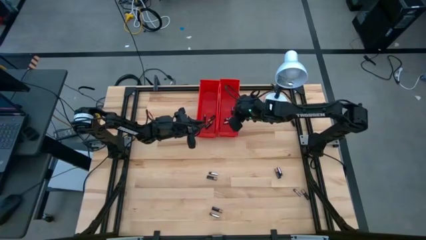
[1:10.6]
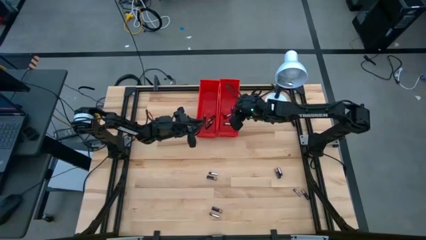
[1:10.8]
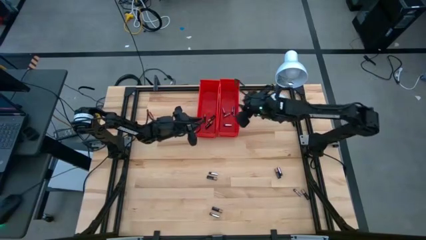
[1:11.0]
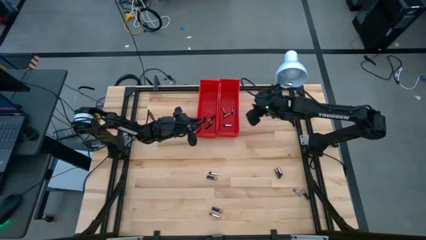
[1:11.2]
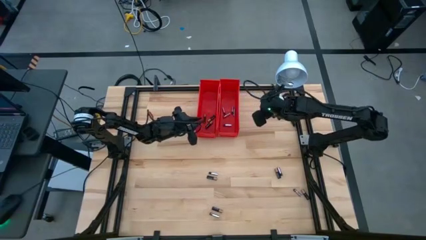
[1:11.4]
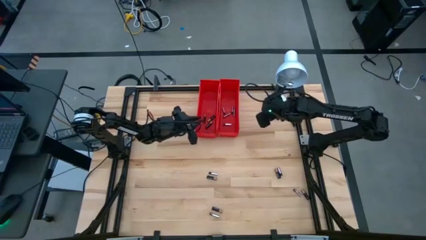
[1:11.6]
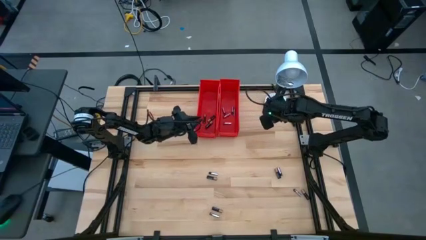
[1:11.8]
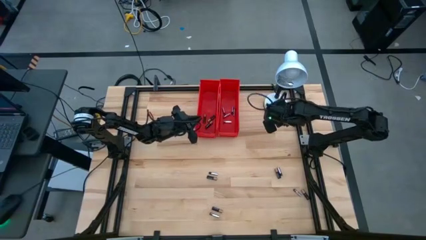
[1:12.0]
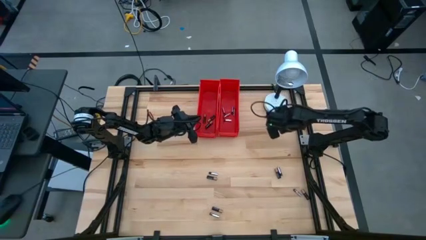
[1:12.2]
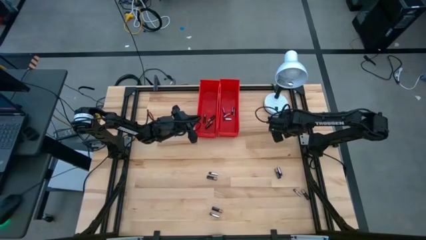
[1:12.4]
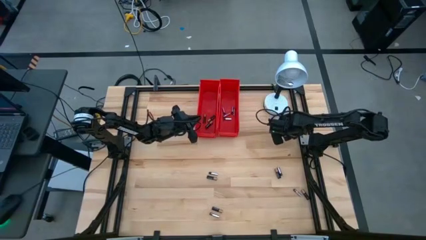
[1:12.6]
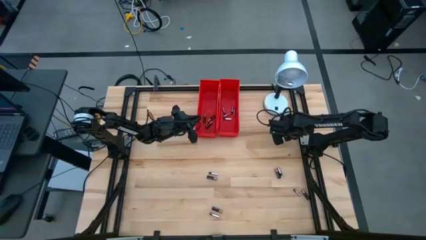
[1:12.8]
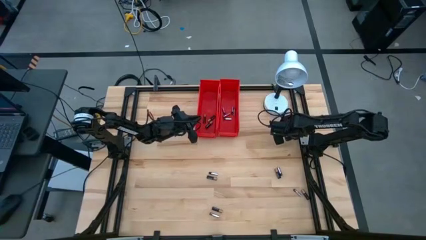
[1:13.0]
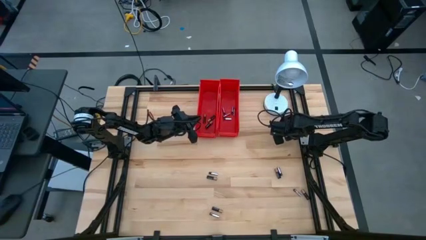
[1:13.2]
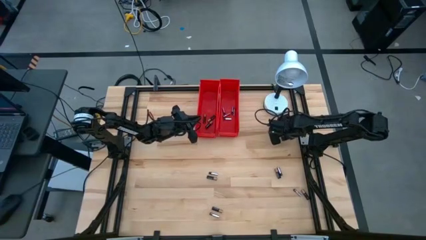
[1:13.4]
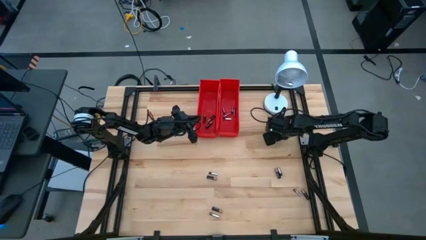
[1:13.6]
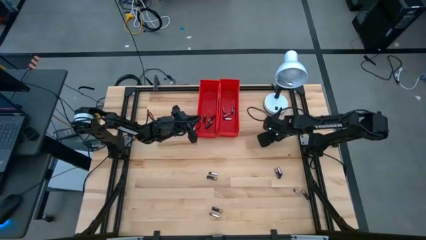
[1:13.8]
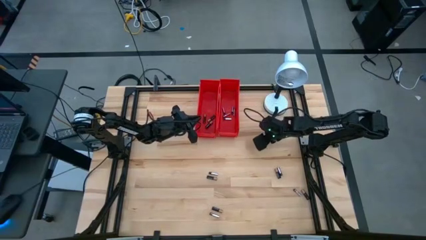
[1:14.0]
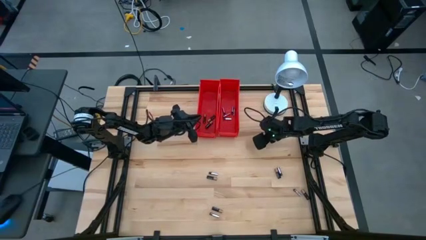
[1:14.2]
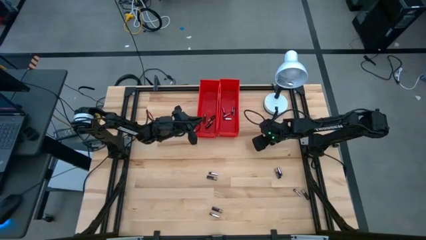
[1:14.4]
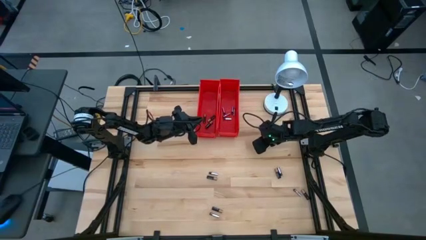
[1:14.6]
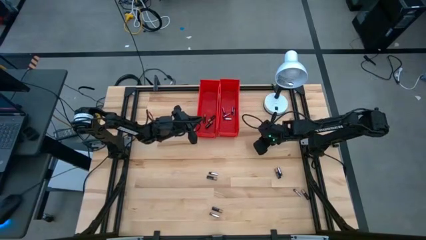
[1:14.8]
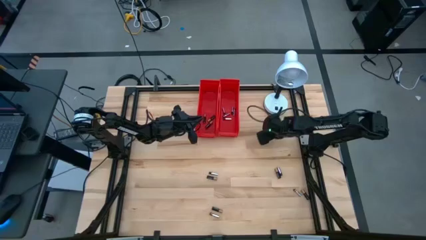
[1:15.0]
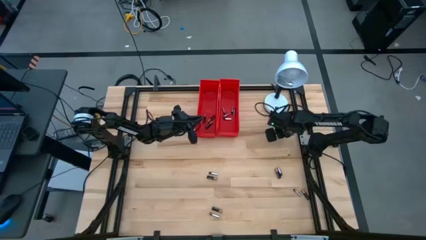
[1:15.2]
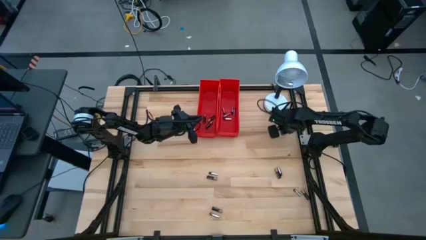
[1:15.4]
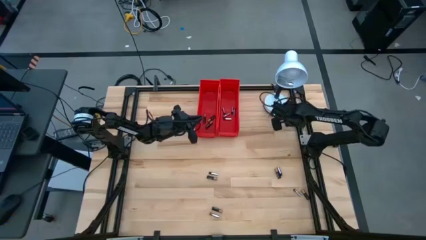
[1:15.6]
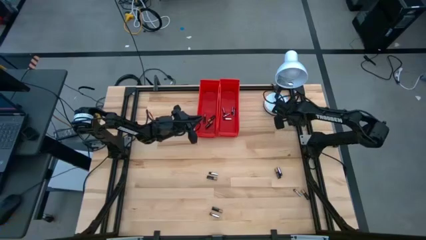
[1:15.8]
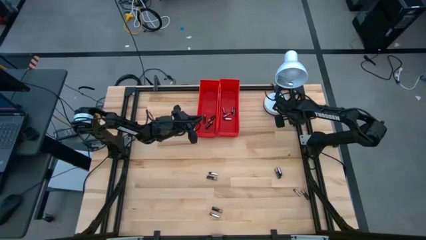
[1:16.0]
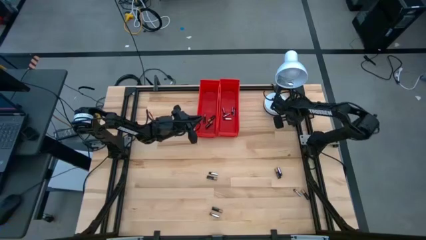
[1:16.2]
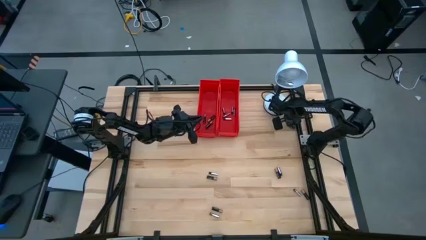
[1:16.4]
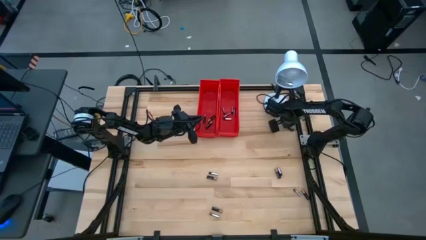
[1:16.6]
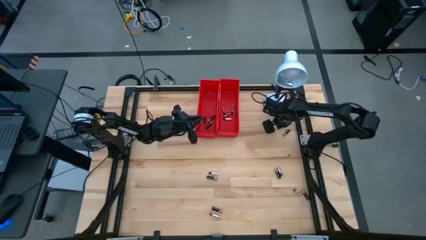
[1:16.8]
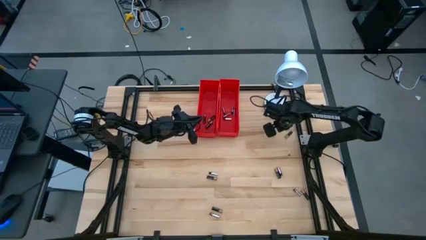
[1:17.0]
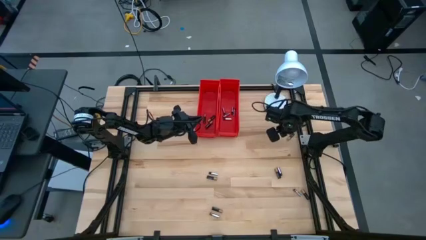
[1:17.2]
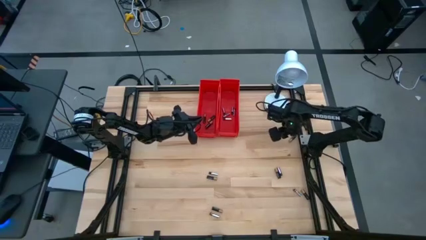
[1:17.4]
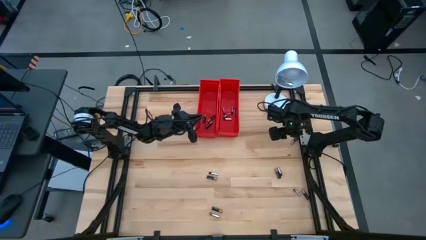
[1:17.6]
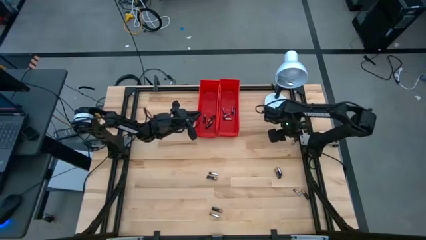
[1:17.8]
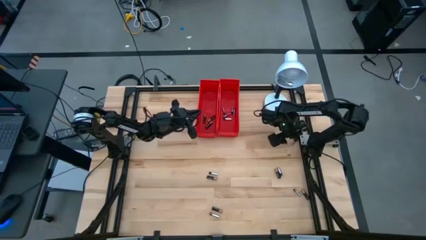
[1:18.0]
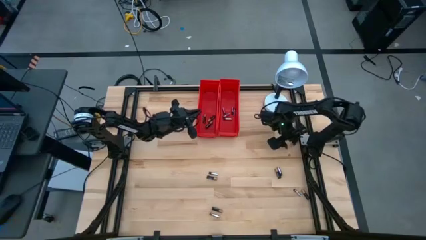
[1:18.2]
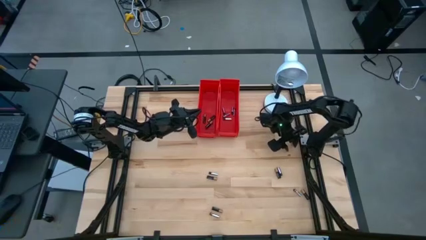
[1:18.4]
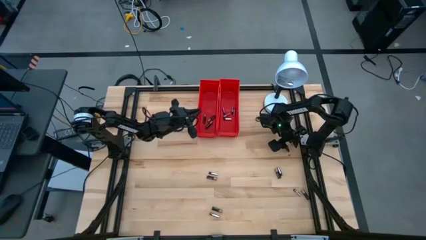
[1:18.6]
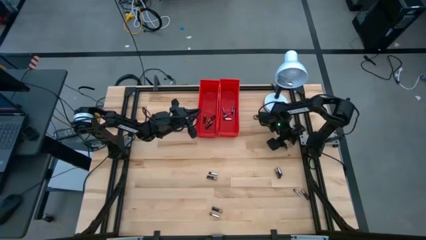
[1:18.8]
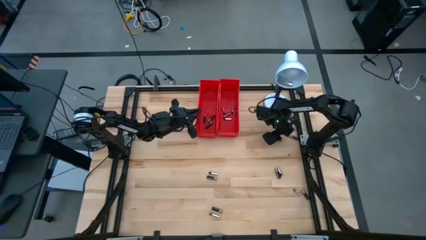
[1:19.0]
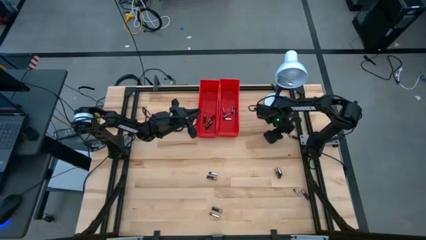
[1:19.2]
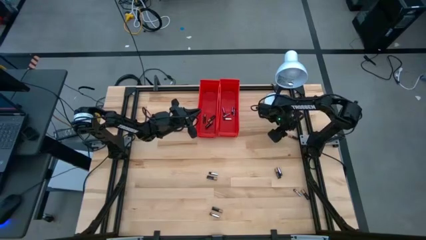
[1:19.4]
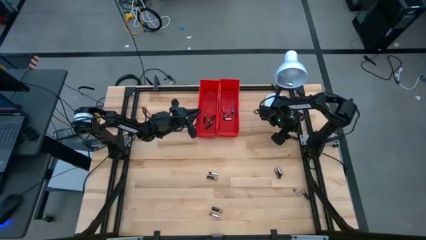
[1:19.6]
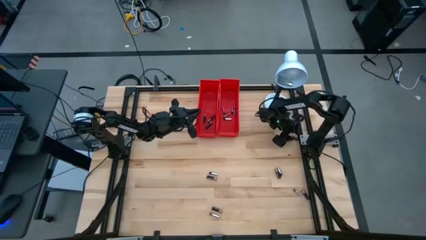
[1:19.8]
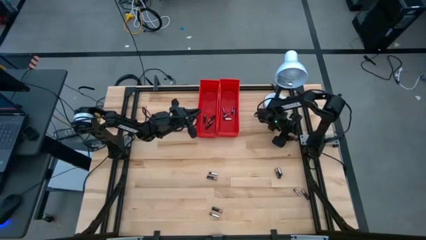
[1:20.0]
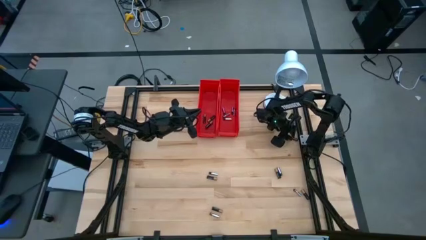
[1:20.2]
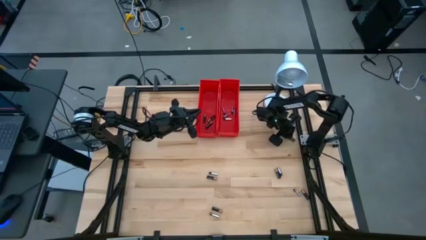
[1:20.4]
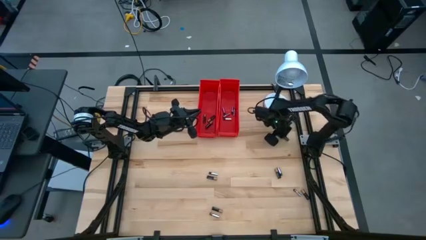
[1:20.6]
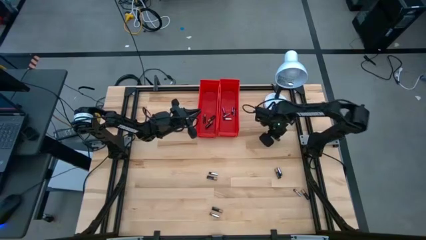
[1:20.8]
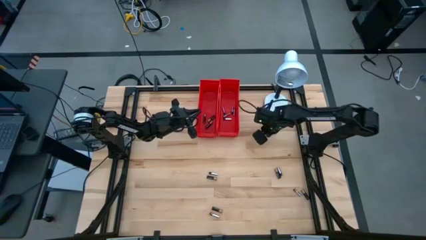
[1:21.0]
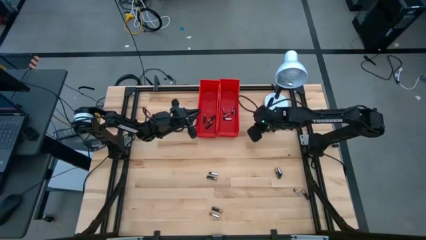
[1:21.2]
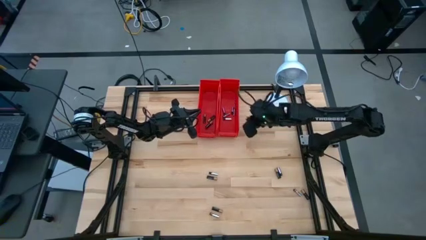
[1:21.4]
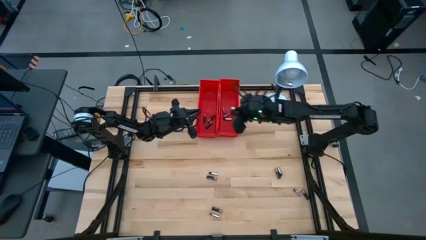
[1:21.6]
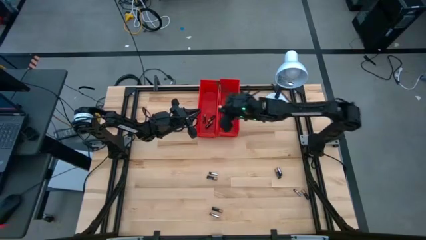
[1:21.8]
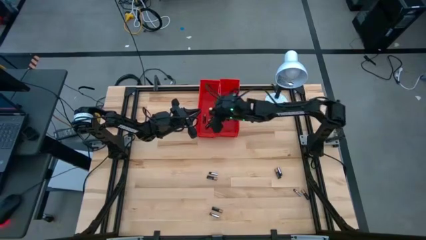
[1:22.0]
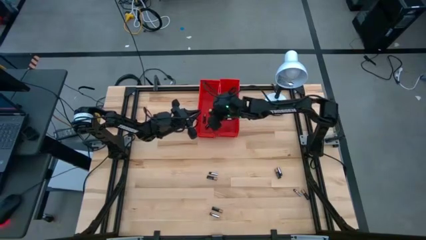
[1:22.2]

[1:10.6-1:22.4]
Task: Sort batteries
Put the black battery into the left red bin
